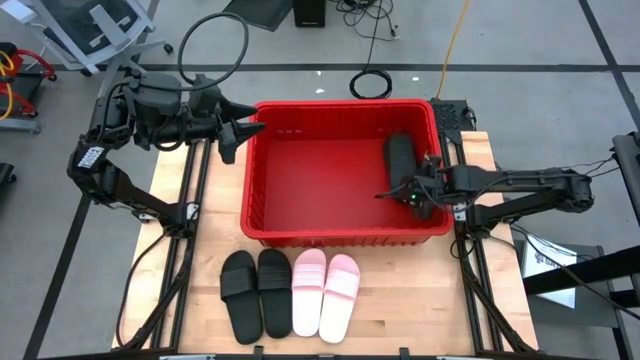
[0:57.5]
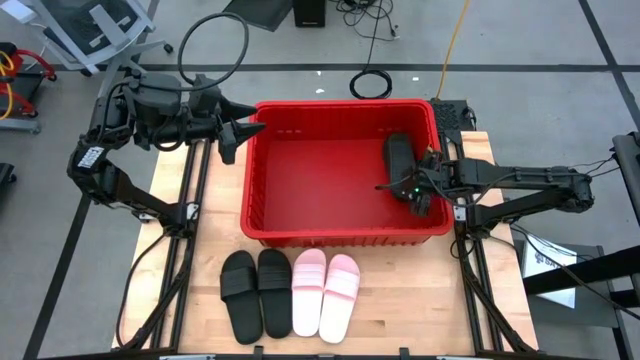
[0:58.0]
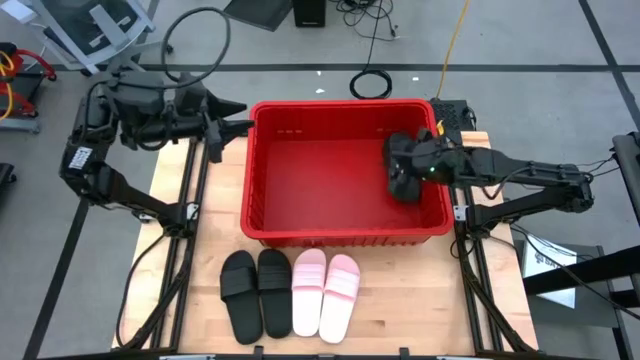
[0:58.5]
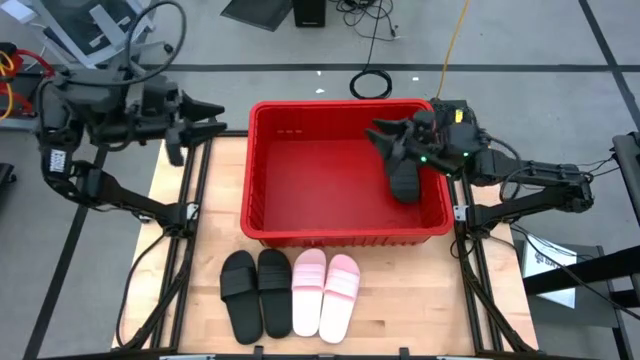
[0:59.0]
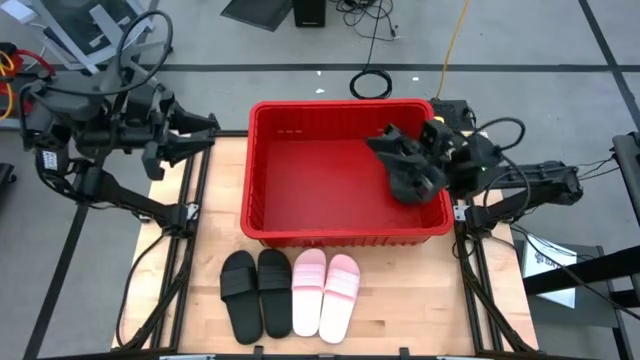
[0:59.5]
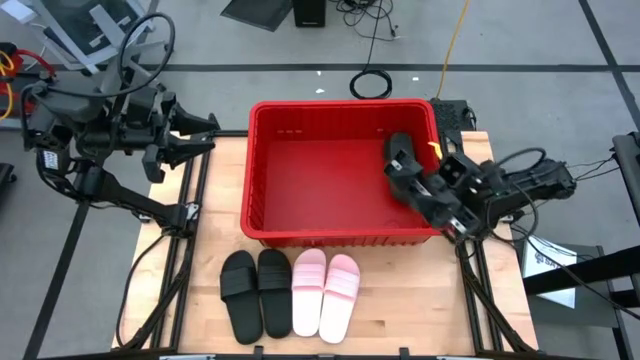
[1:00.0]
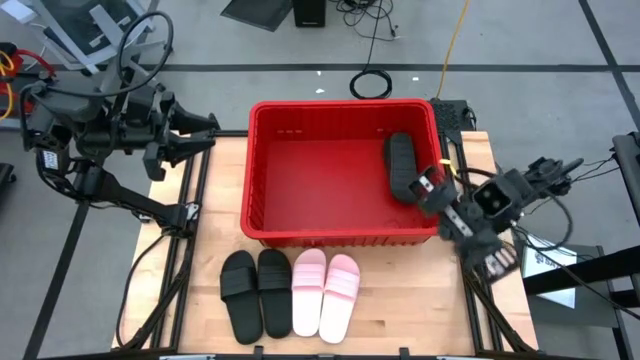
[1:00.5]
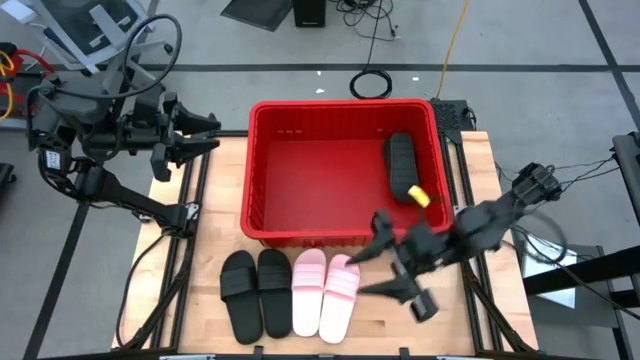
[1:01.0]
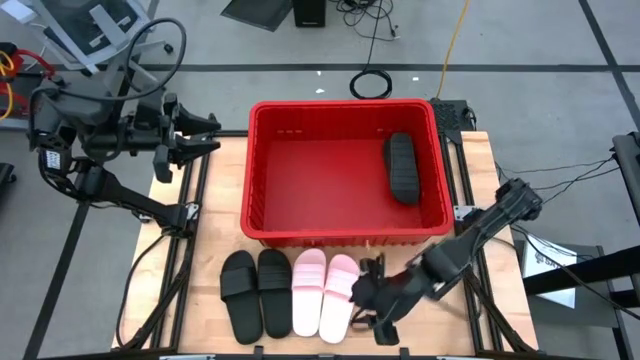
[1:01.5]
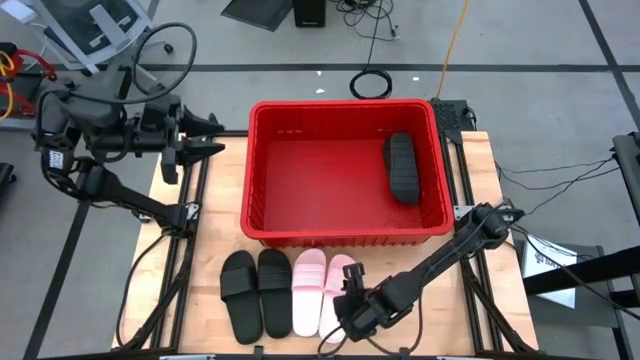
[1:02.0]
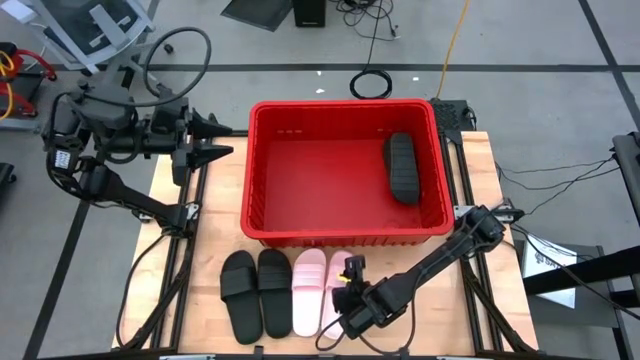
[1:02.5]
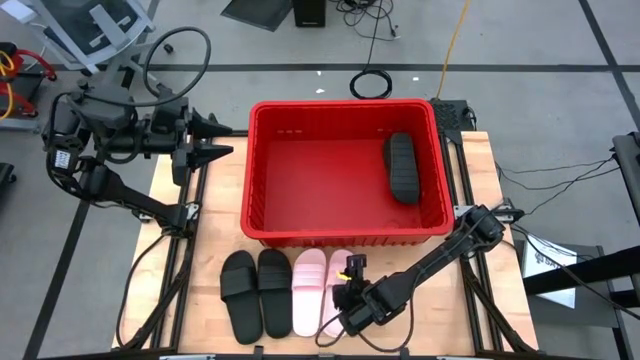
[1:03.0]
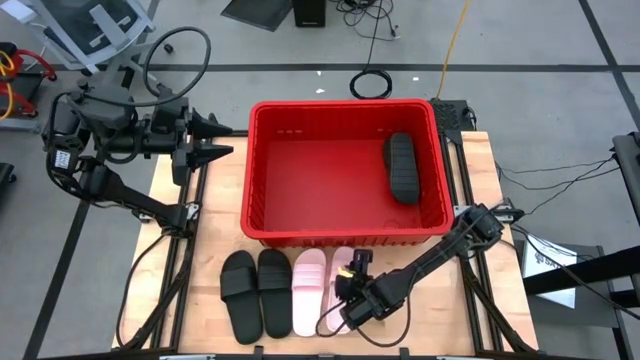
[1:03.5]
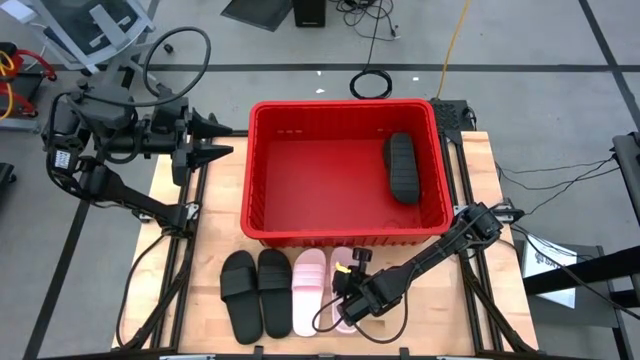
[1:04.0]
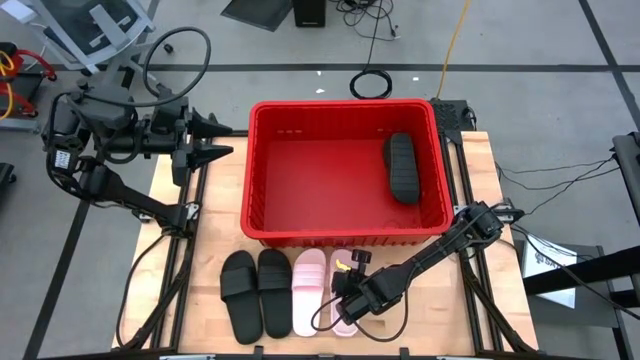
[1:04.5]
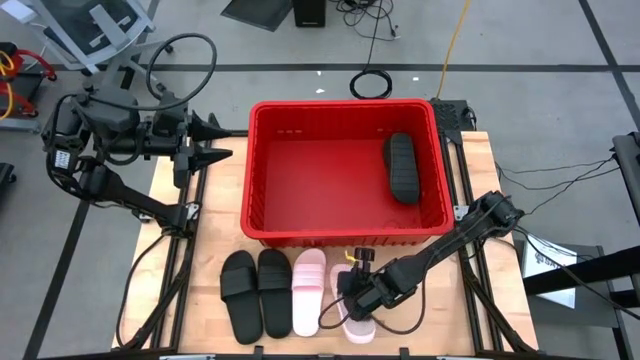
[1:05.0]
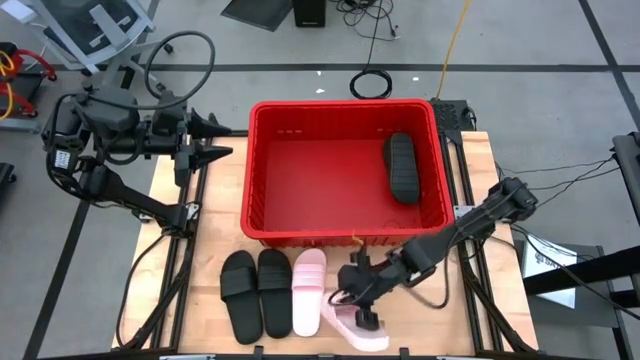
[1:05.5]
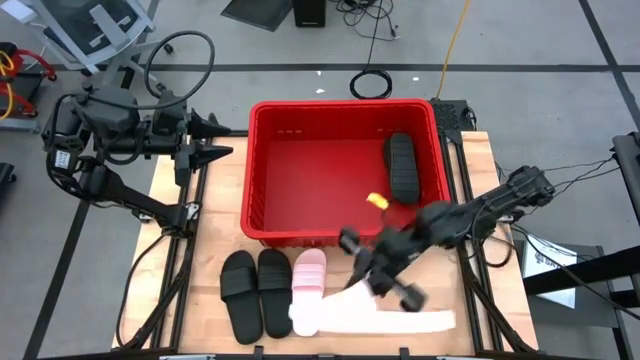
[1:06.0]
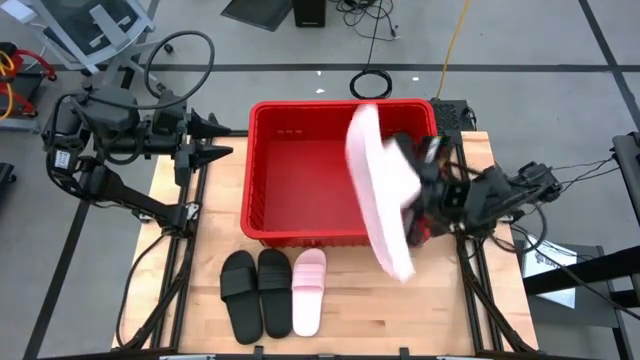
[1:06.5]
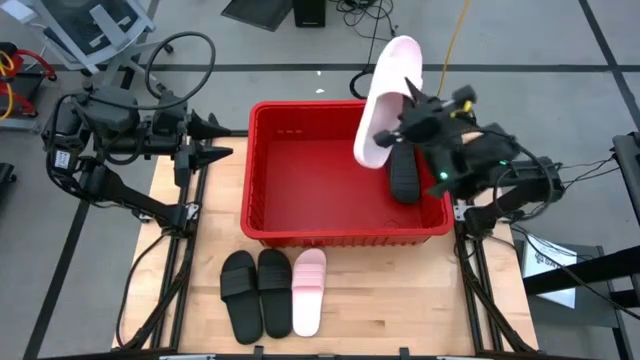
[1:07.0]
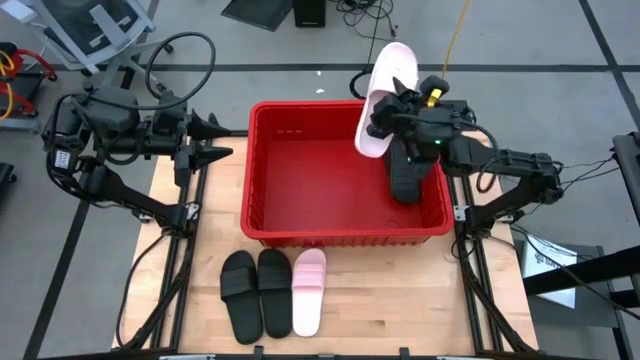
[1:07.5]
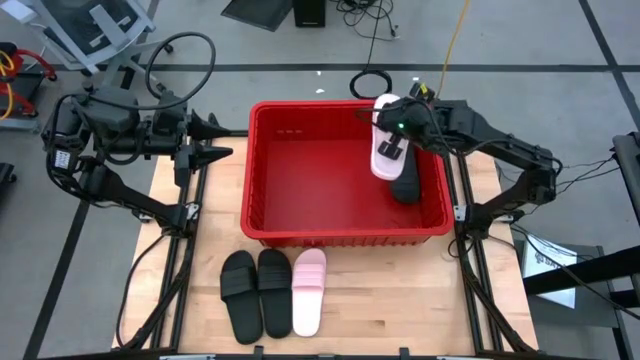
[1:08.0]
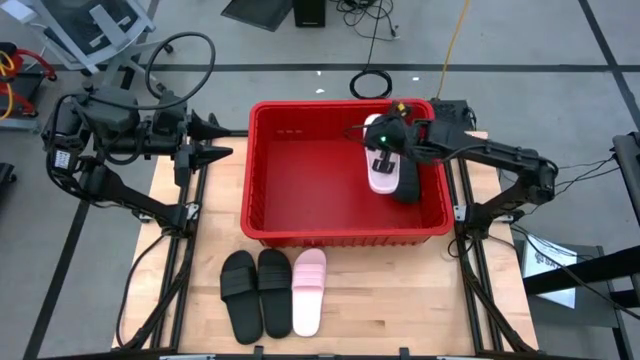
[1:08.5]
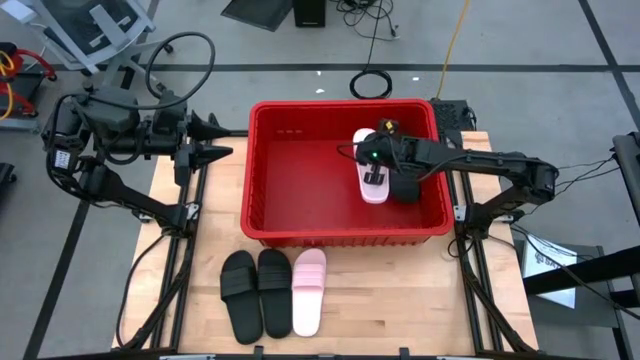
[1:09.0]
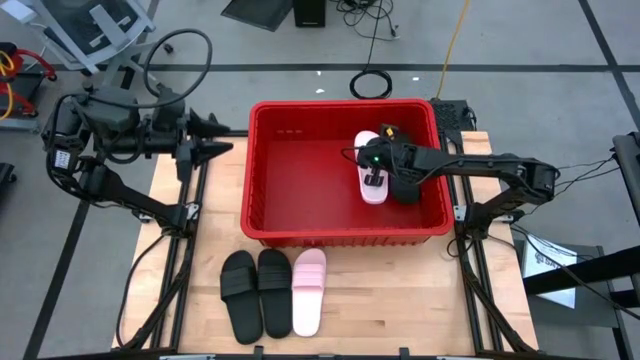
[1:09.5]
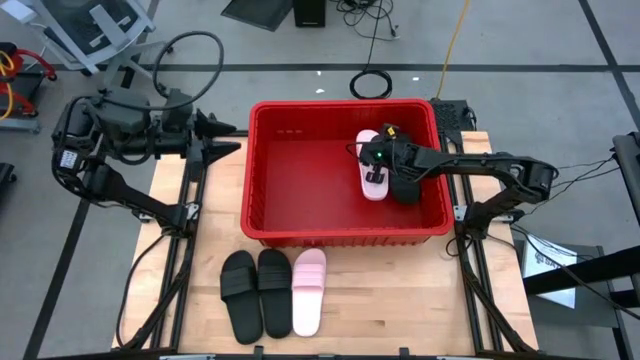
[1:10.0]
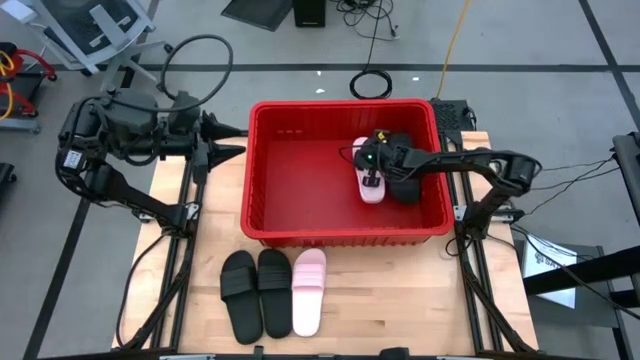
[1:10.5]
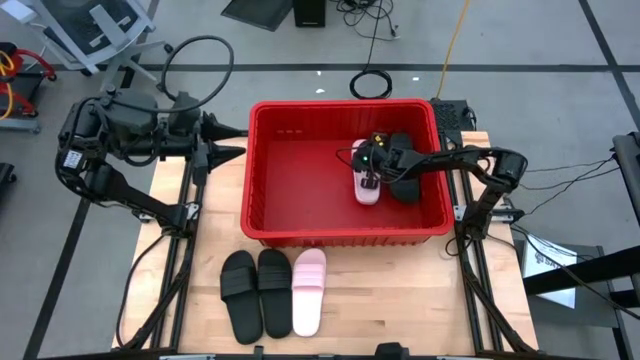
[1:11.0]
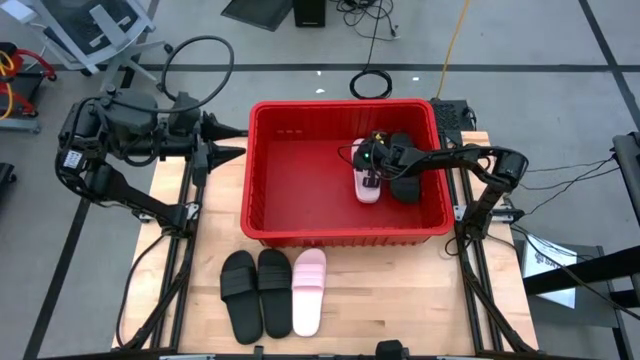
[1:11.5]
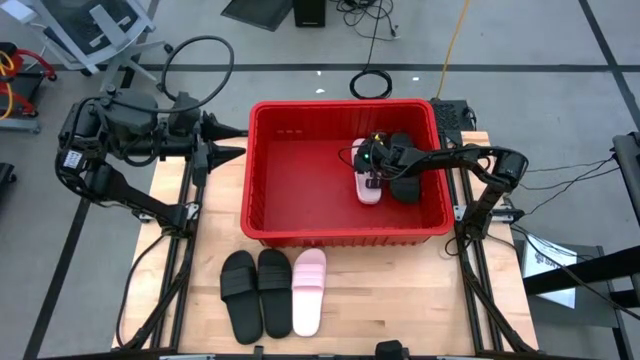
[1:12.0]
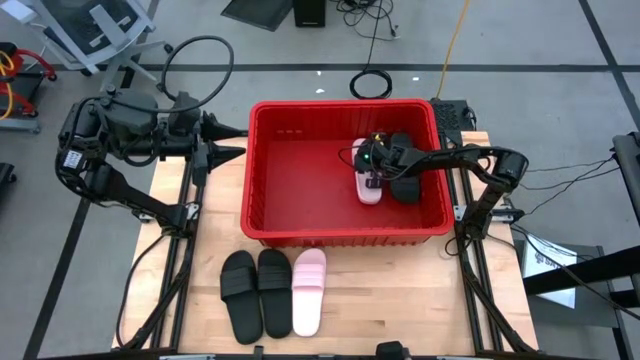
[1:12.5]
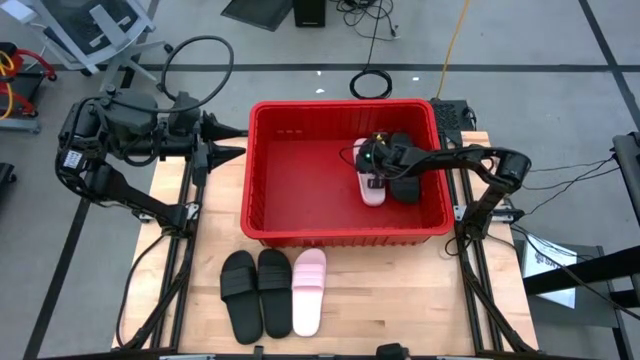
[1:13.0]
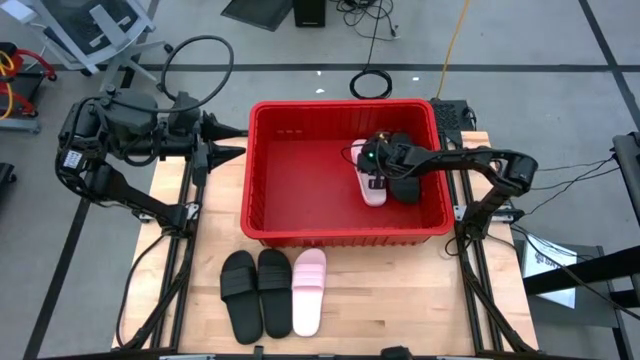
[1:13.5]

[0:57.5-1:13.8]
Task: Pick and place slides into bin
Put the pink slide into the red container

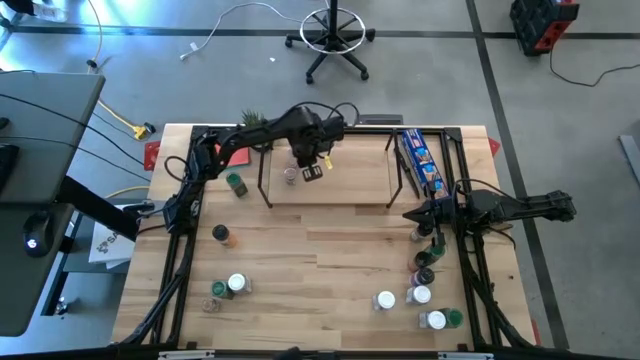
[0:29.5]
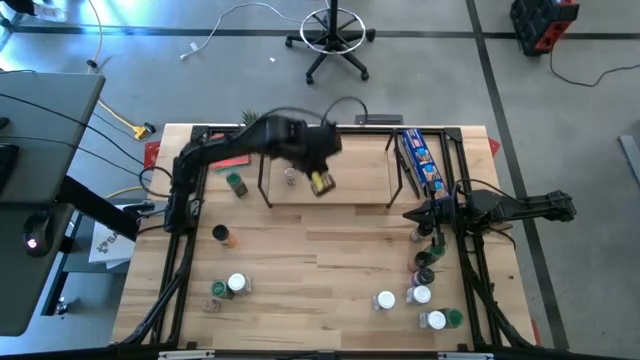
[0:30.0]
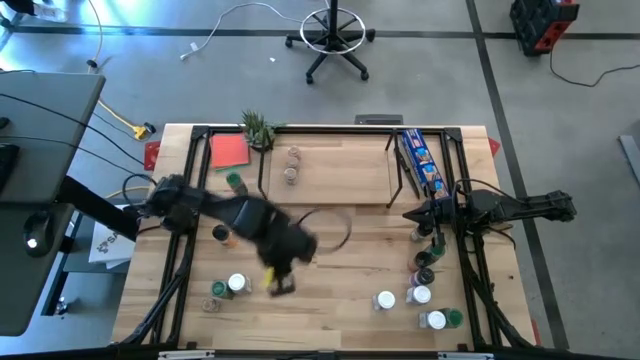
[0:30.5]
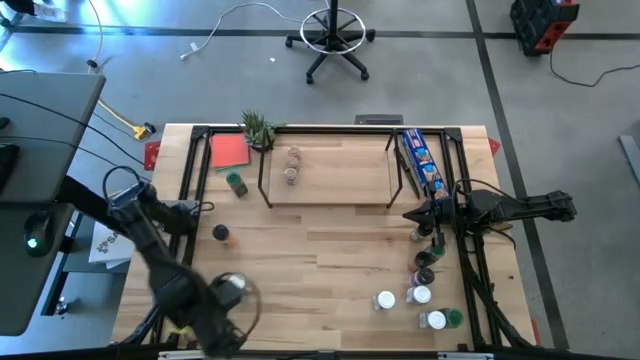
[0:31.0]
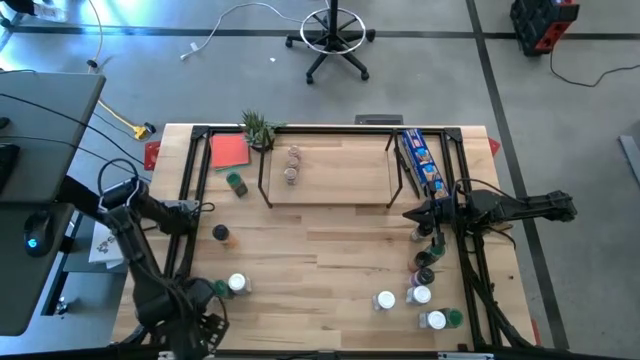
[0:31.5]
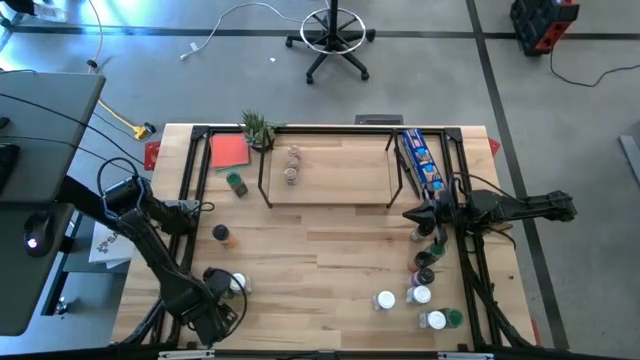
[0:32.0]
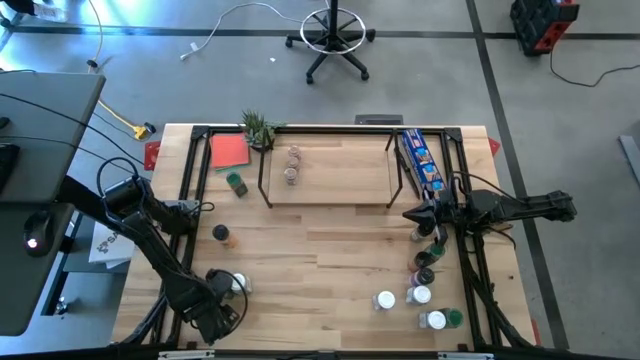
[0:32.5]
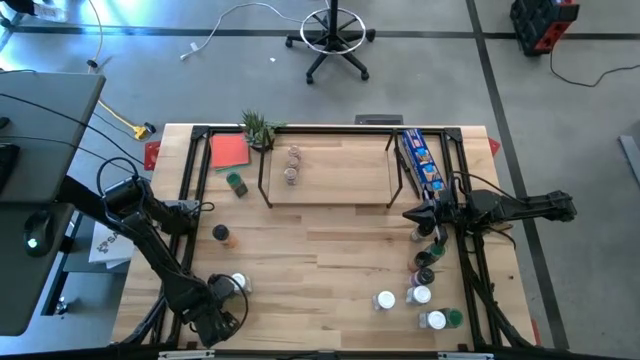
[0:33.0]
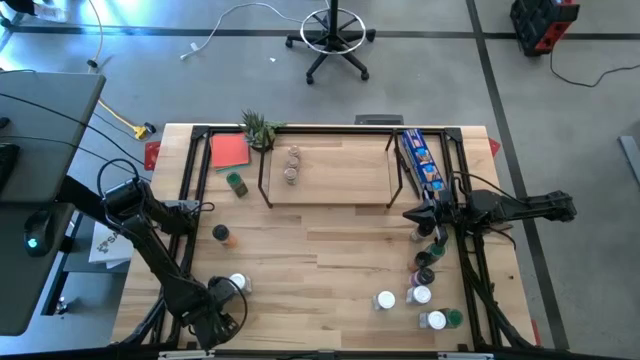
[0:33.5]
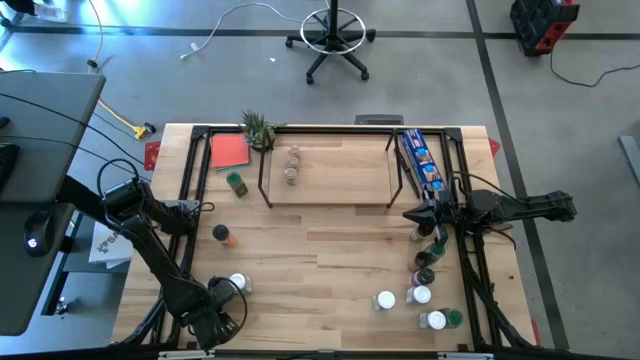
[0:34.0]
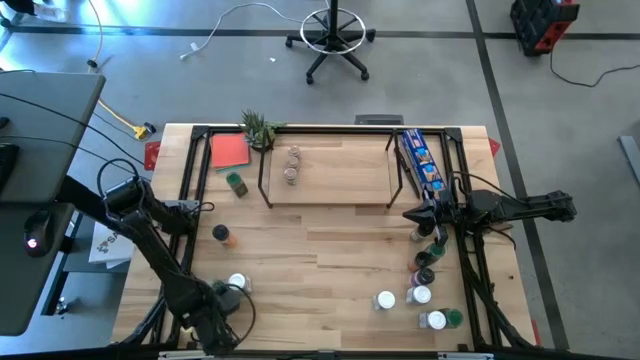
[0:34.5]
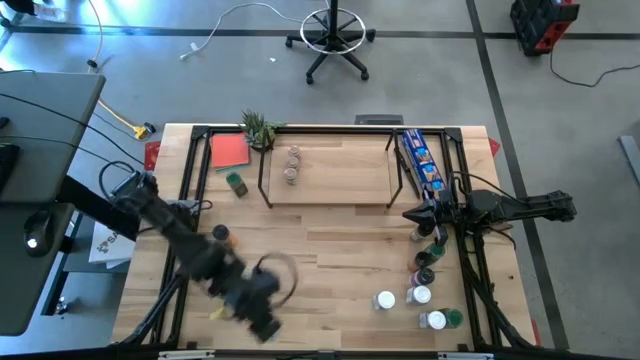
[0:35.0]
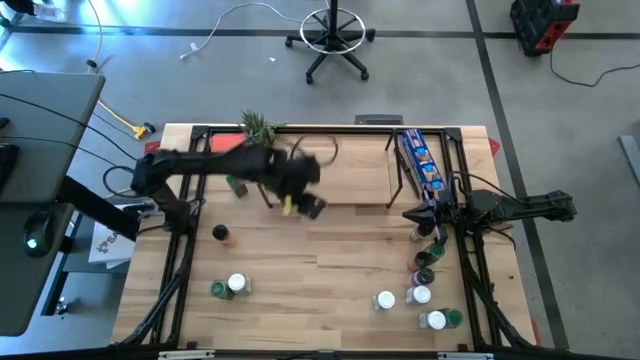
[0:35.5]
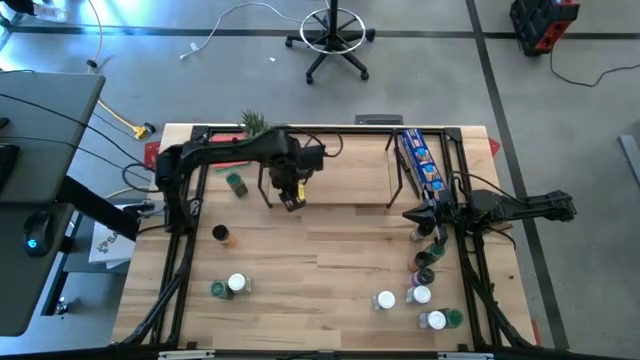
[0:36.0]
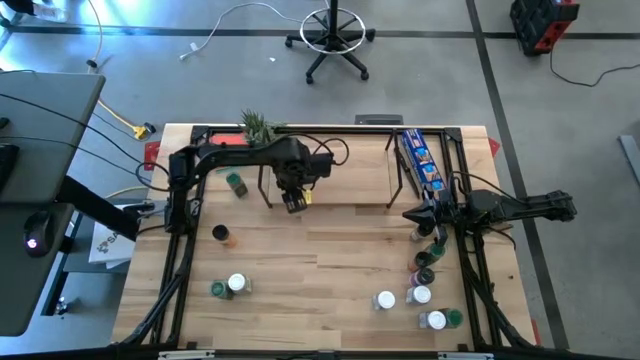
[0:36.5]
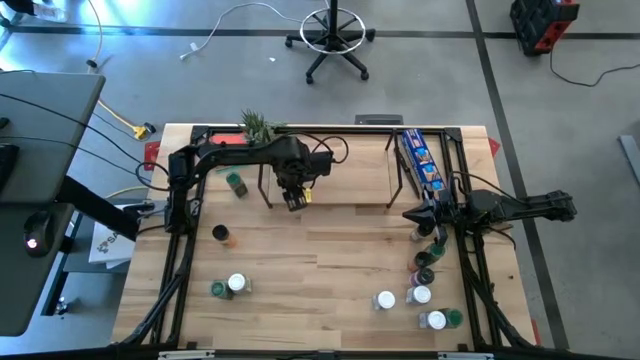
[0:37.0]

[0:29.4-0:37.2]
Task: Shelf spices
Put the brown seasoning bottle aligned with the other brown seasoning bottles on the shelf
